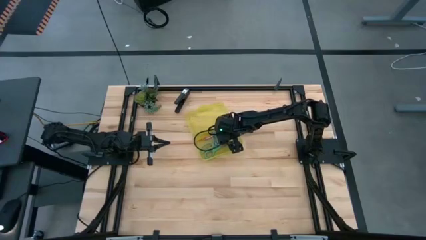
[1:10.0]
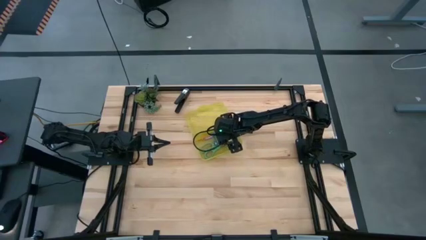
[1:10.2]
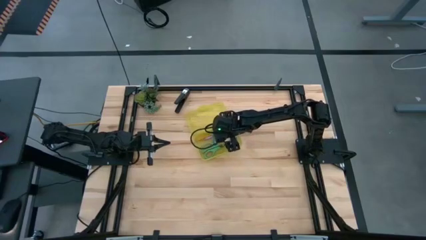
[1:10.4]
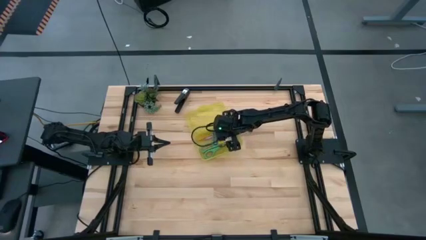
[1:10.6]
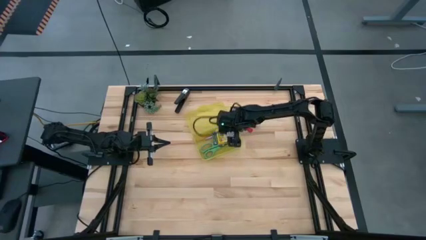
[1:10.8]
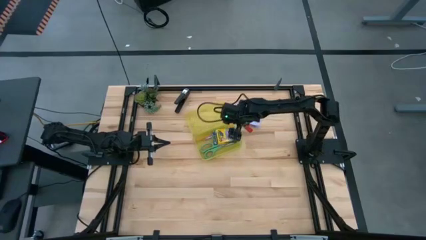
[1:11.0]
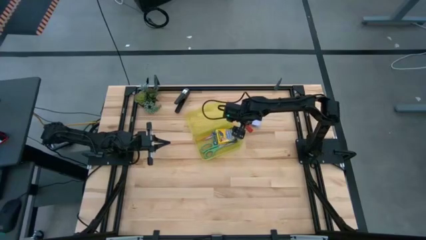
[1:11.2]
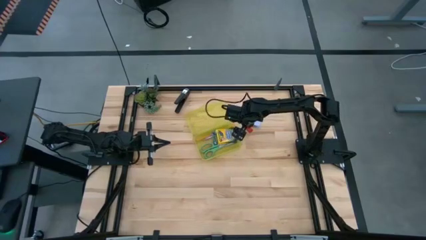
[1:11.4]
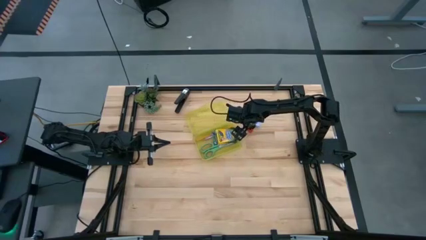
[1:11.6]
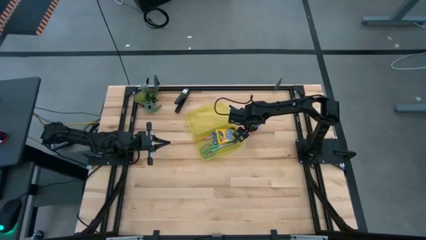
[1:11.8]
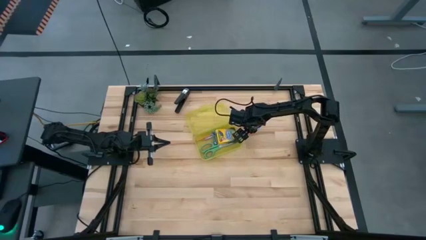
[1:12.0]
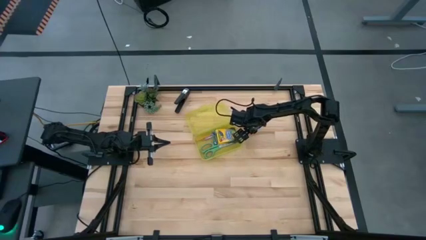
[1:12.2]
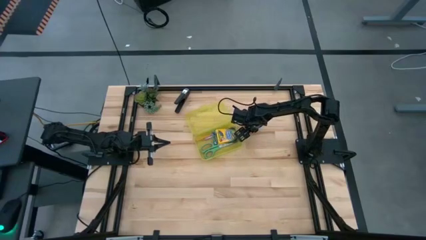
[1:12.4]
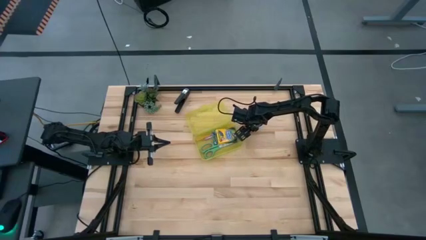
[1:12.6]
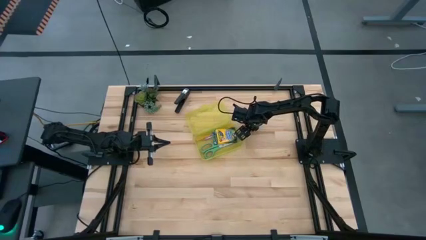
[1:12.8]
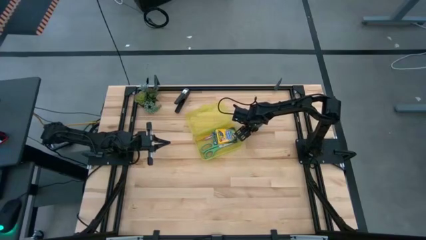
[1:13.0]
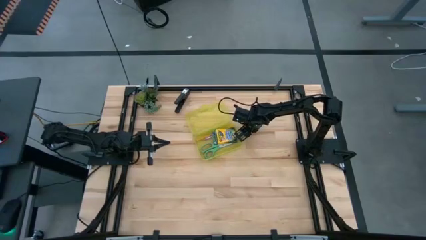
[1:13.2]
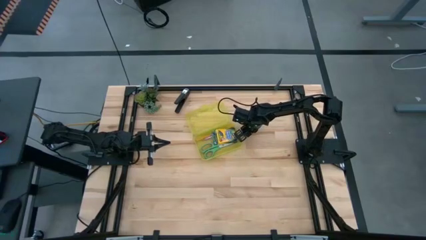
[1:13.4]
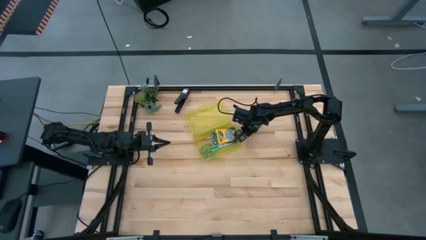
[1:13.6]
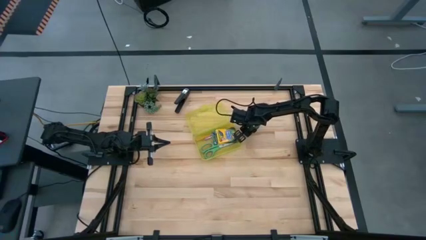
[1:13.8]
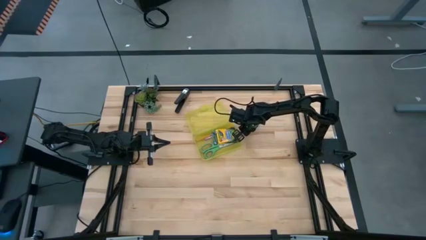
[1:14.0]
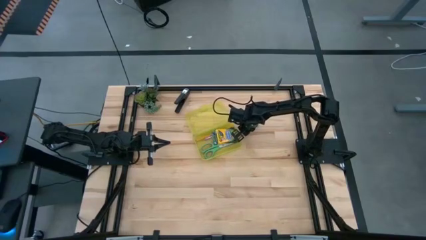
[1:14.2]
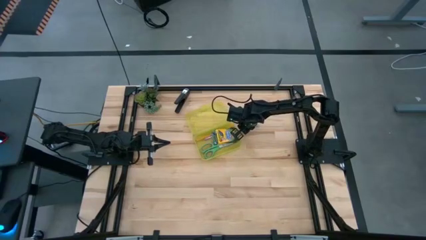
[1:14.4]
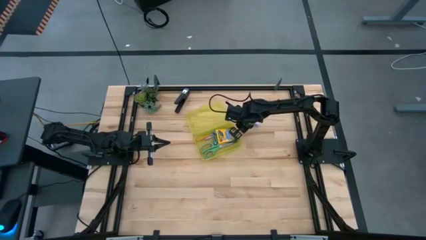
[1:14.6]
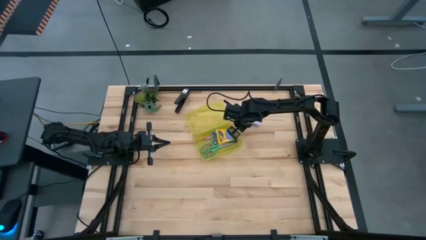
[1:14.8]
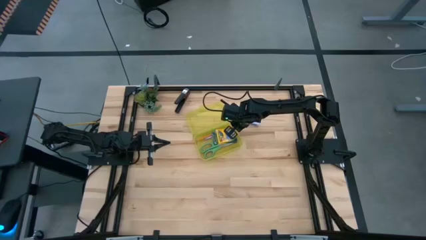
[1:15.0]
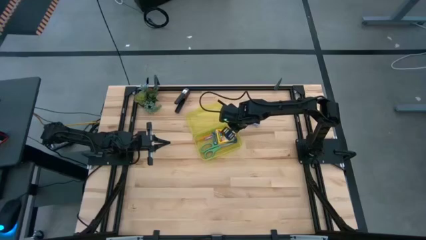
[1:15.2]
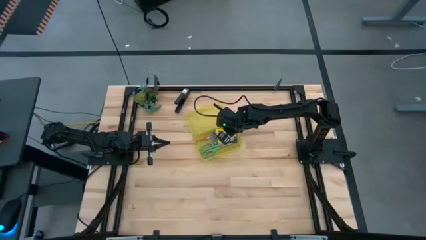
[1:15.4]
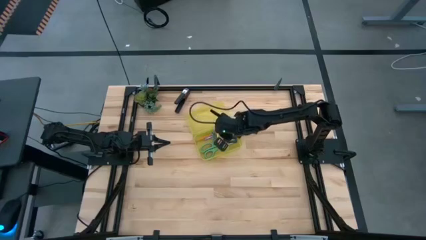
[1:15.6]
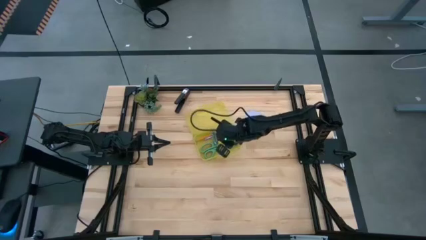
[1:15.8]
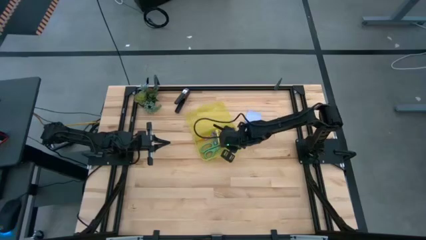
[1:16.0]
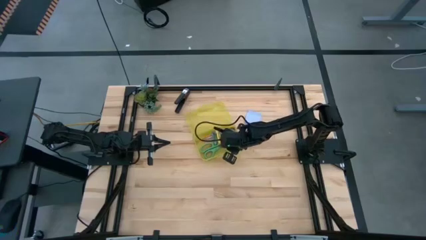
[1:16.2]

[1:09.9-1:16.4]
Task: Pack school essentials
Put the red eraser into the yellow supply box

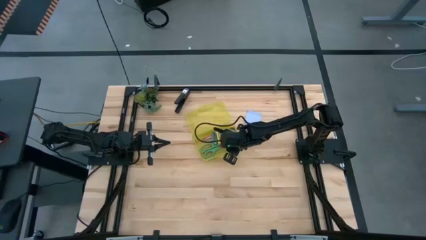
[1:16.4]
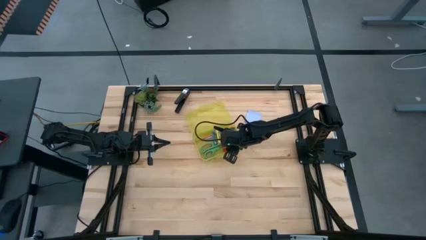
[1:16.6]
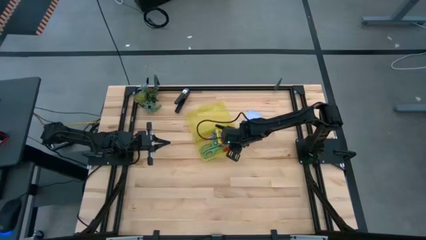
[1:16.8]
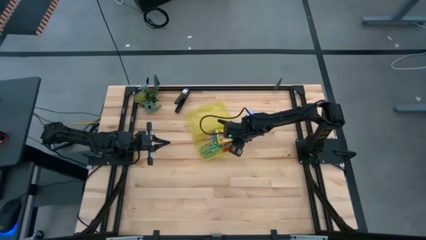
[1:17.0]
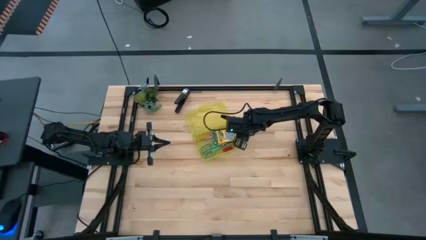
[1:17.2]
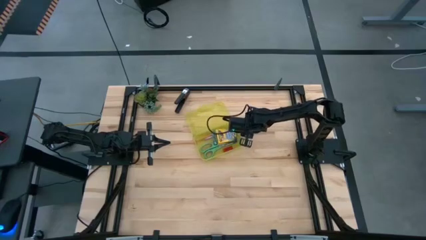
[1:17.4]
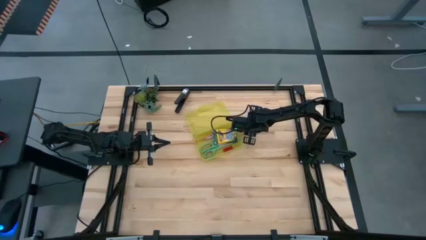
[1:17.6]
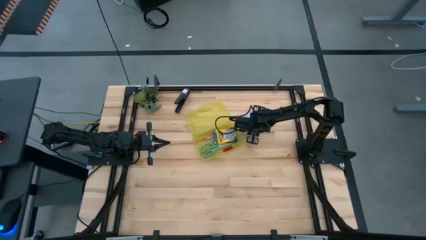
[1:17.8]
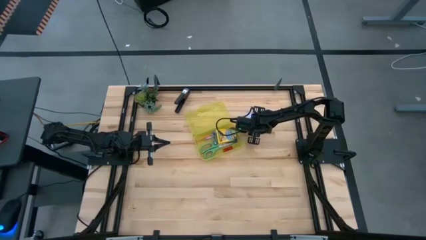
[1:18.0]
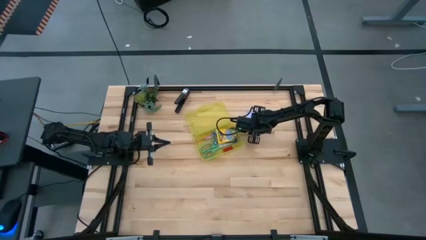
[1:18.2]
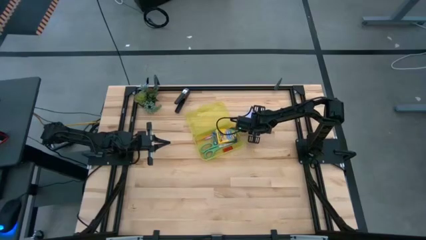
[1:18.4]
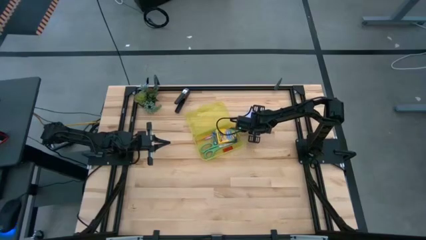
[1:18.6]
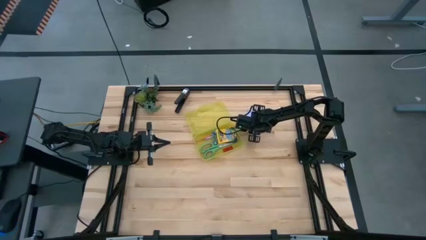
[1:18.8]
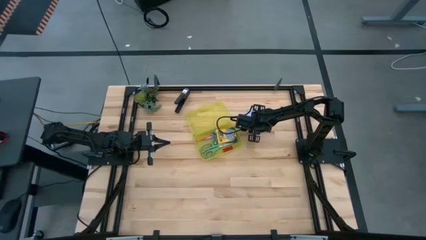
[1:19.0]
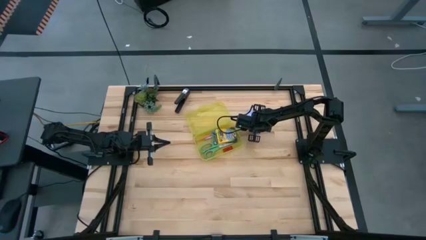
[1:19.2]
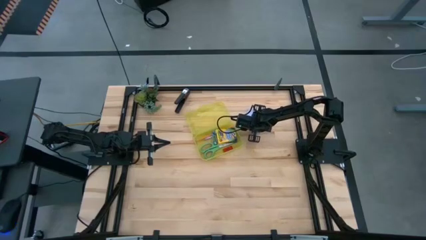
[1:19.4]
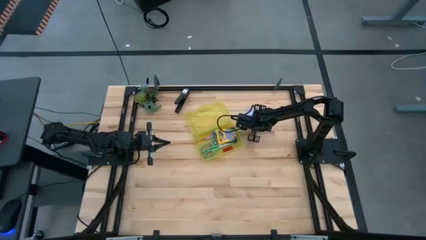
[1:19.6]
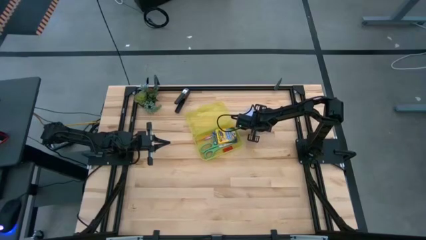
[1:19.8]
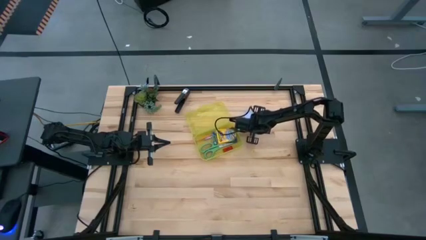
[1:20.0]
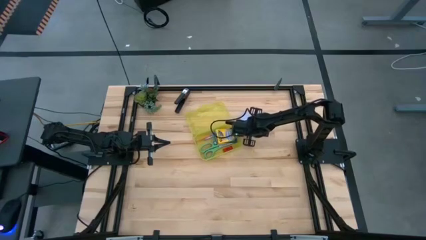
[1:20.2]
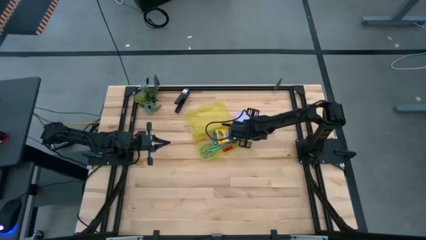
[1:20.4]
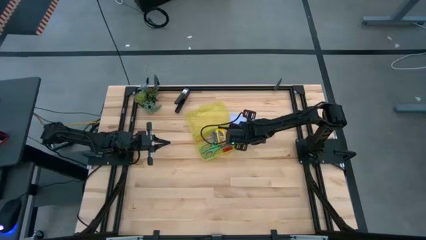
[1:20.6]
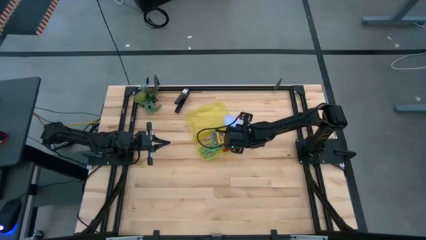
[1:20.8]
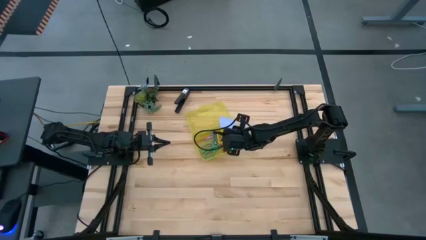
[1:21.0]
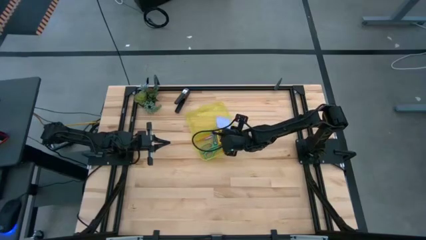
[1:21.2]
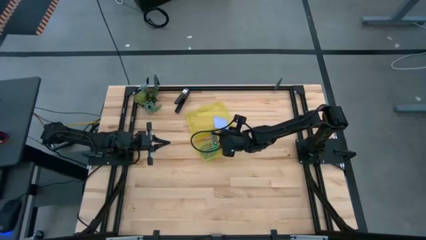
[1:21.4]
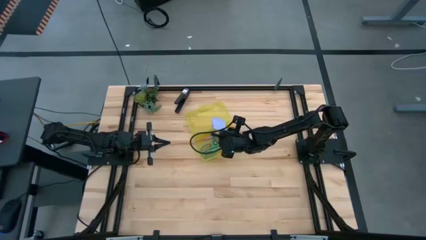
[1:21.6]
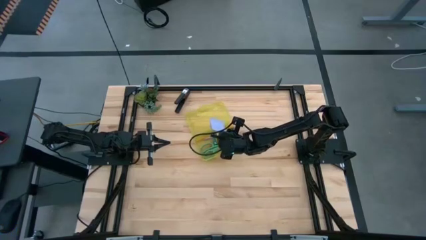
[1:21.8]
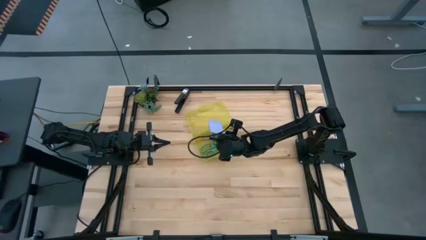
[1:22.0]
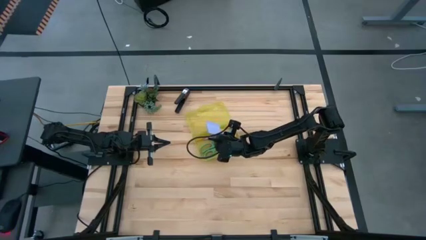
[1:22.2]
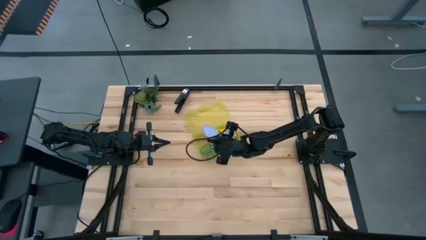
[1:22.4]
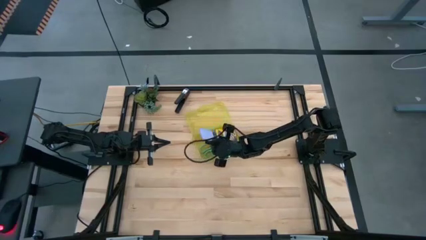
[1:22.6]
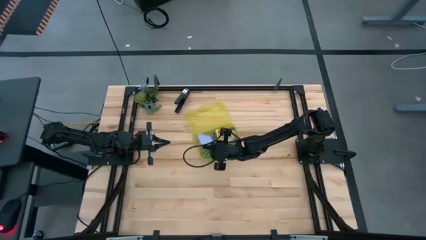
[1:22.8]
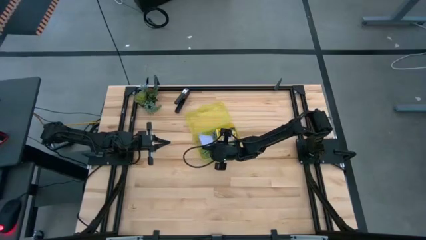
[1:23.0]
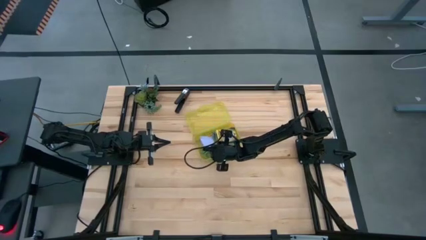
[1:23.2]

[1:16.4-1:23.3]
Put the purple sticky notes into the yellow supply box
